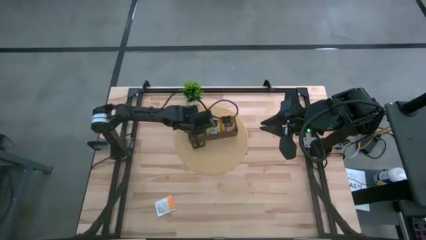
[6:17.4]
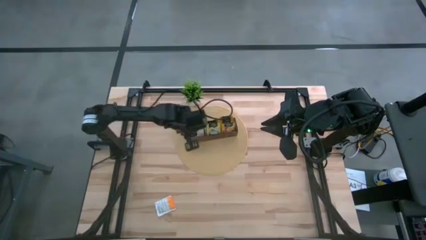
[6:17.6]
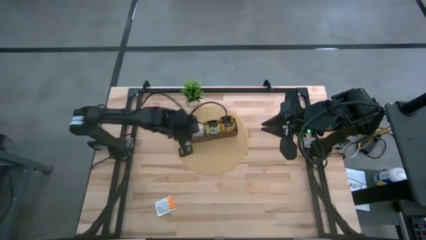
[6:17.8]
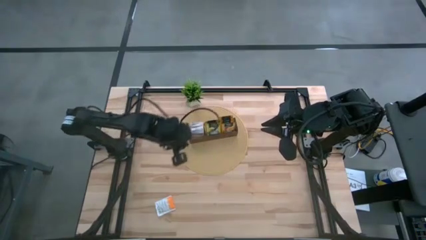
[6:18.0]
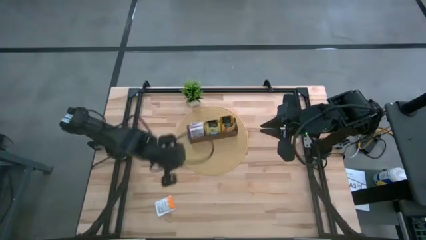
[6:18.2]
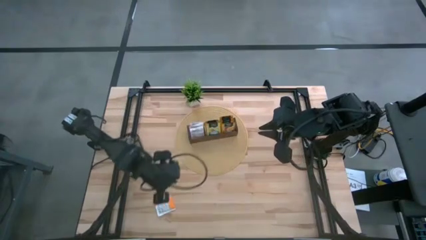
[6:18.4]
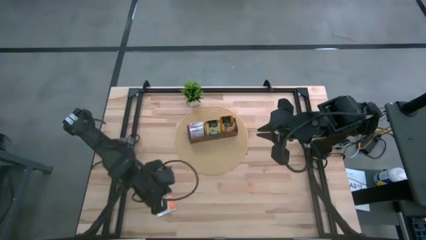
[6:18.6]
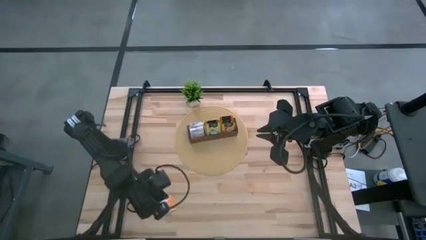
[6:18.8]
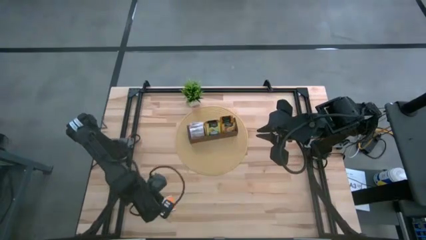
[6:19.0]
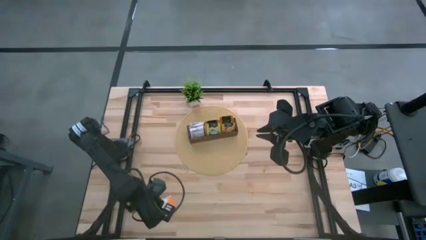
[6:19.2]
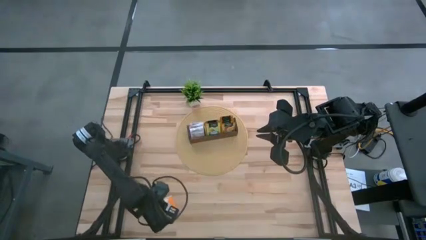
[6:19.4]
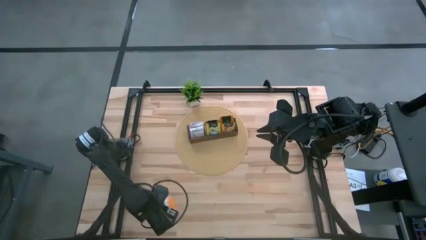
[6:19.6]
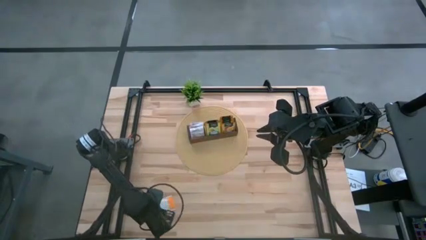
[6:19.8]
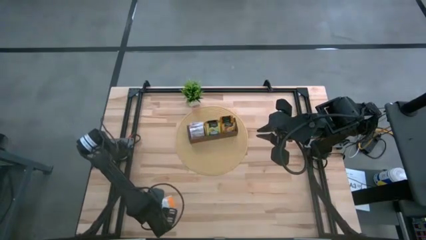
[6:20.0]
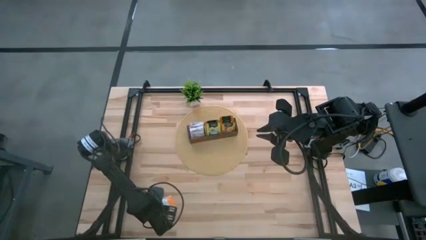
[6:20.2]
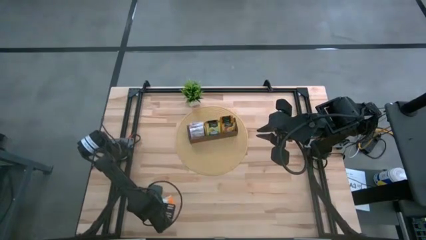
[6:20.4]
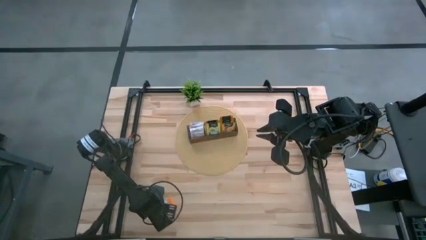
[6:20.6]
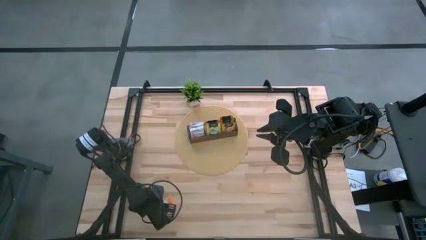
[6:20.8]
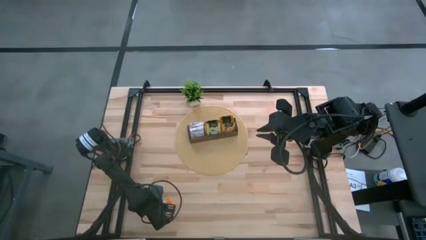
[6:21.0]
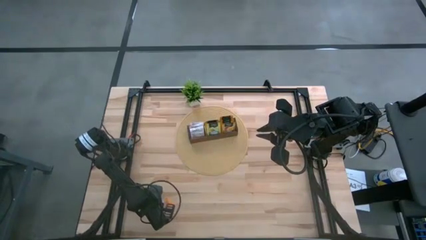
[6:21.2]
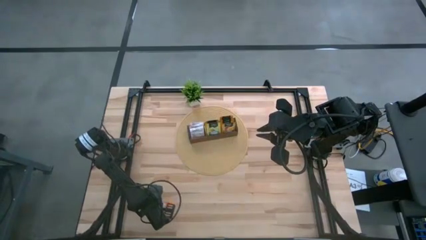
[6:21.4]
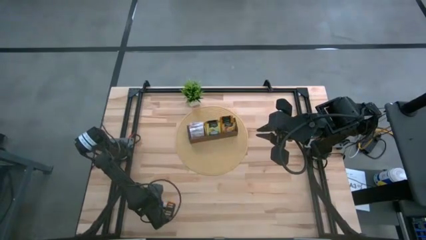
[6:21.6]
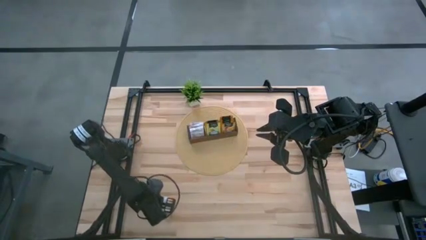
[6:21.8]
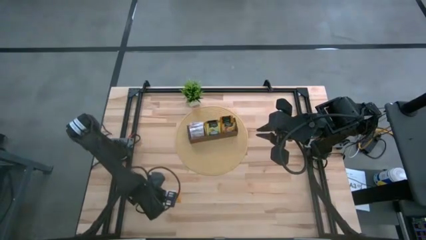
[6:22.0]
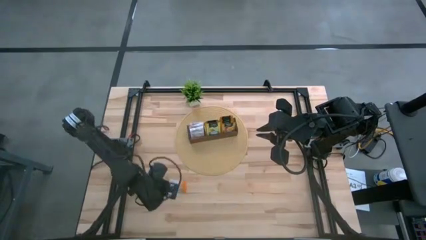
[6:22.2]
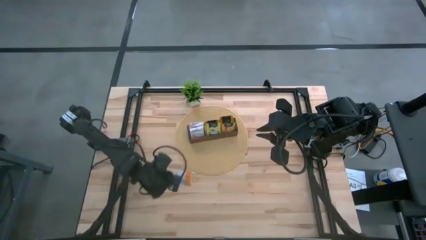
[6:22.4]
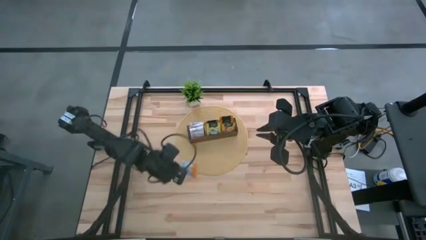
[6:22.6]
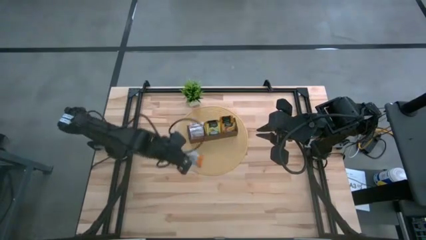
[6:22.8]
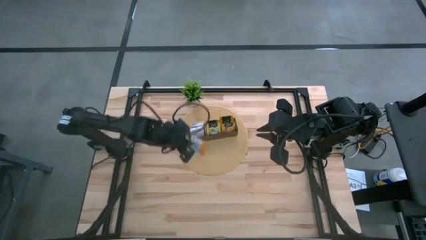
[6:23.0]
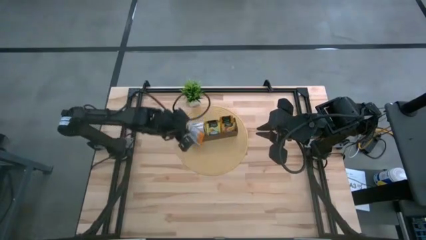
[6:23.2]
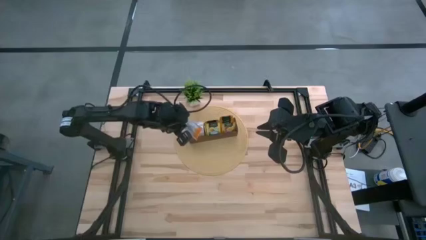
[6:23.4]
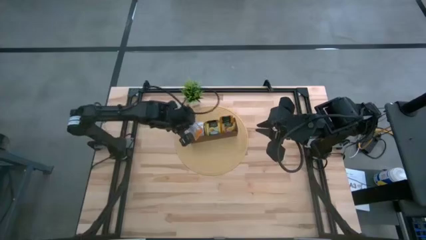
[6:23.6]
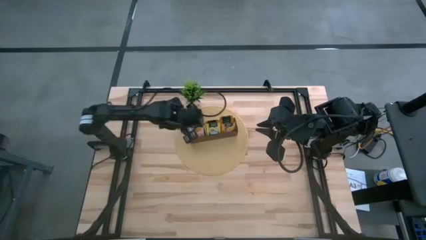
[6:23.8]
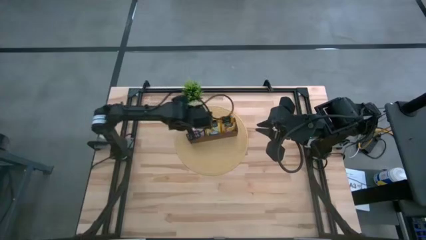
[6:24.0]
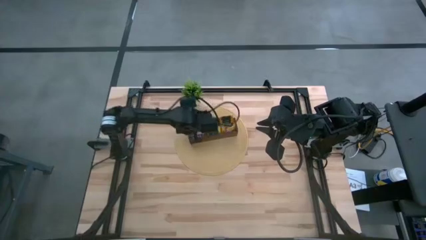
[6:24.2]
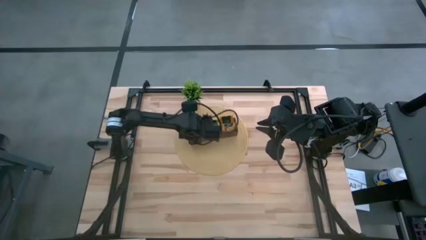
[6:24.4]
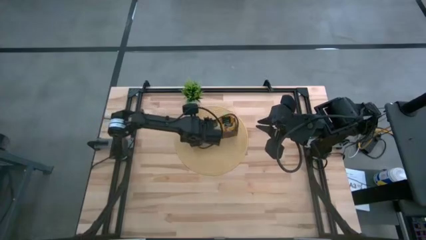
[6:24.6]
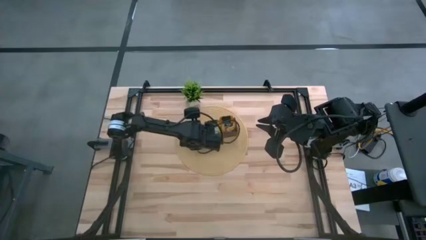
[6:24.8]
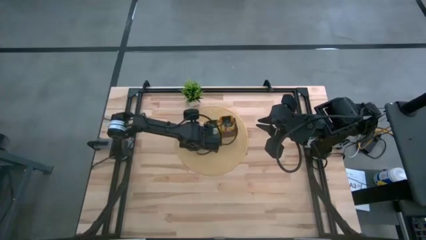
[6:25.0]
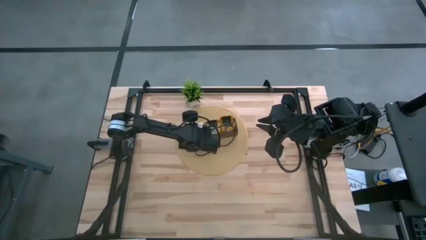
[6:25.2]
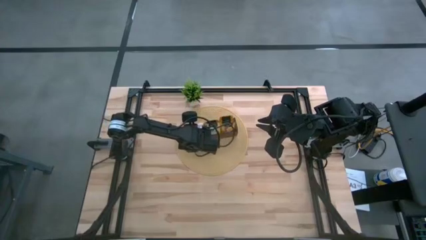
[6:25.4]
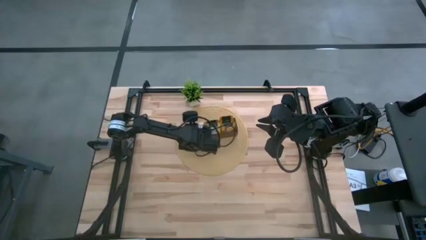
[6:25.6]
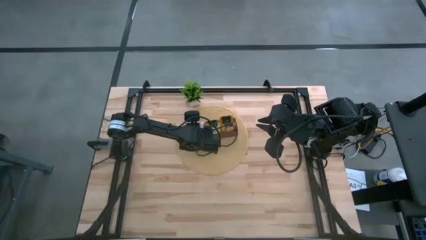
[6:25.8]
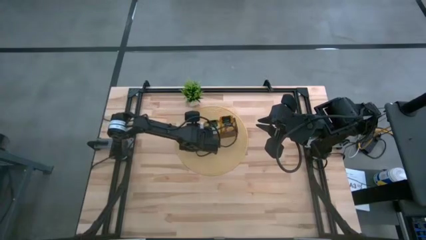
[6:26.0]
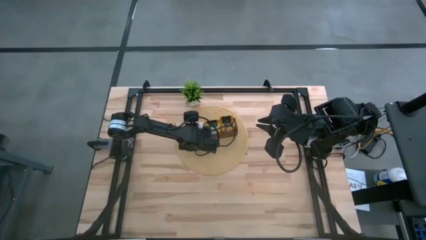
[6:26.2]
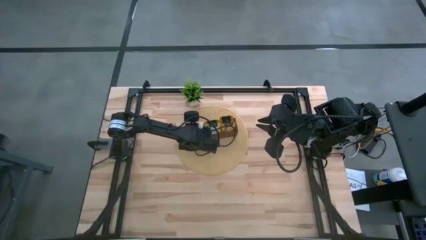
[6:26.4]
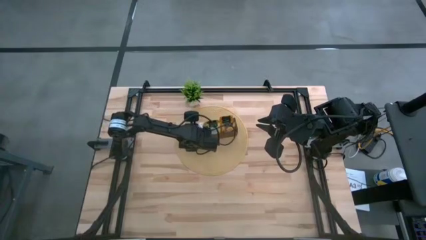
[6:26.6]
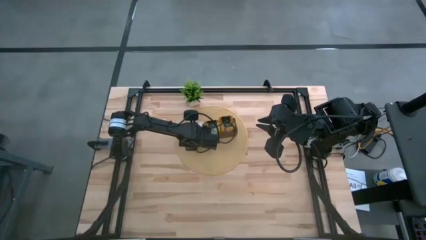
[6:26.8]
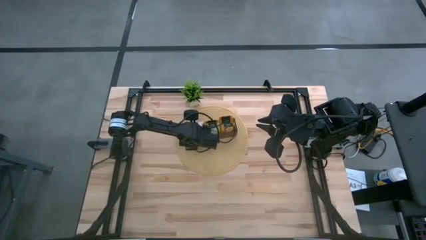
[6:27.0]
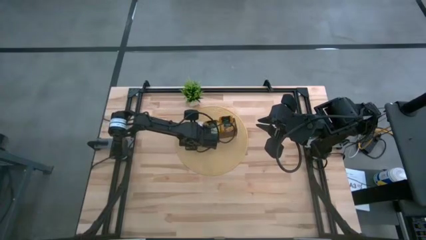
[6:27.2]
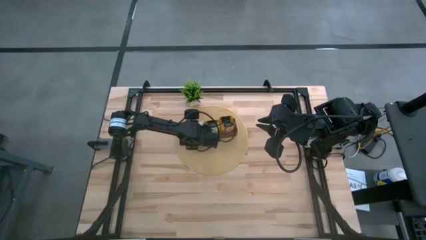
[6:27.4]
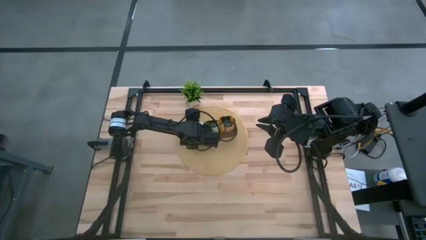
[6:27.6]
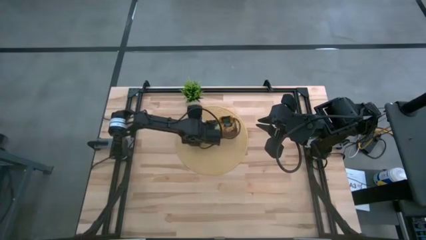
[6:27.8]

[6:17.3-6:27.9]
Task: Pick & Place Tea
Put the white tea bag into the left section of the wooden organizer

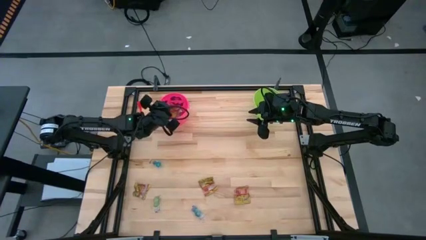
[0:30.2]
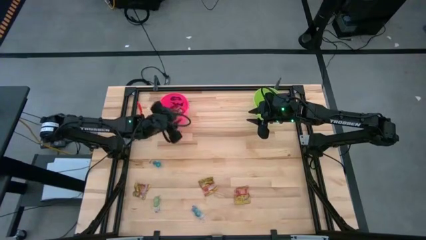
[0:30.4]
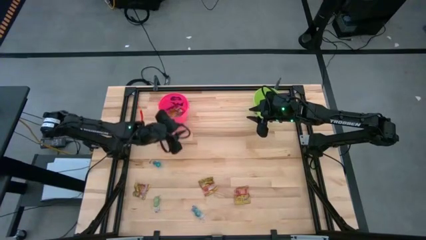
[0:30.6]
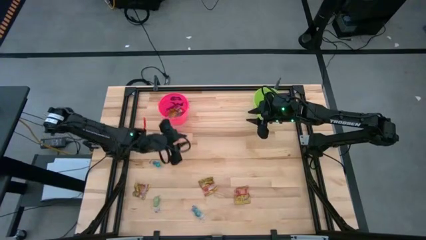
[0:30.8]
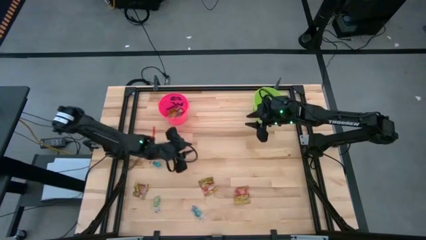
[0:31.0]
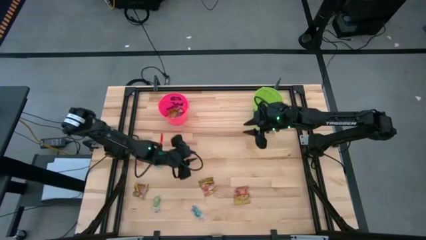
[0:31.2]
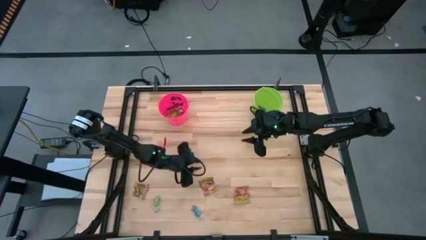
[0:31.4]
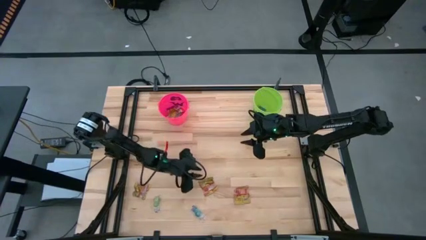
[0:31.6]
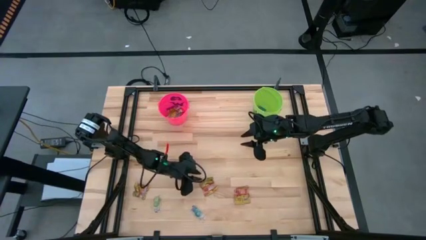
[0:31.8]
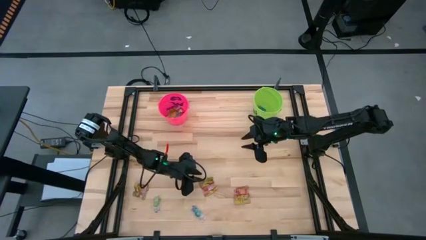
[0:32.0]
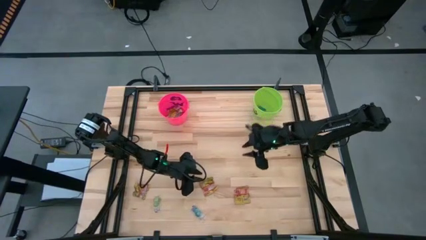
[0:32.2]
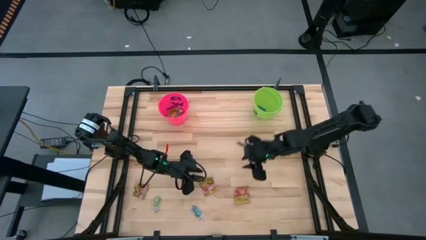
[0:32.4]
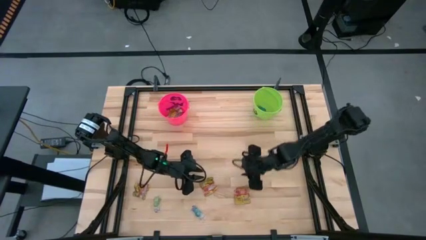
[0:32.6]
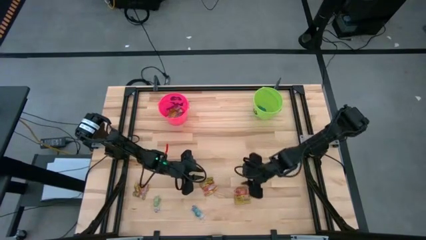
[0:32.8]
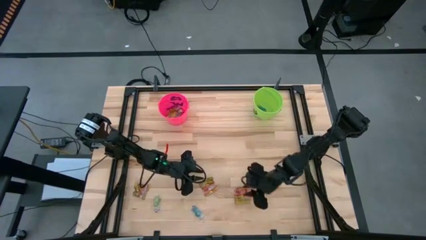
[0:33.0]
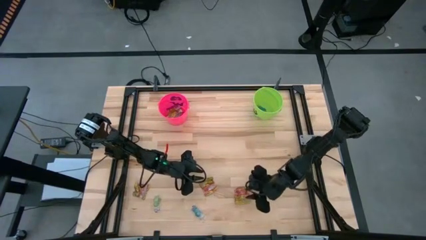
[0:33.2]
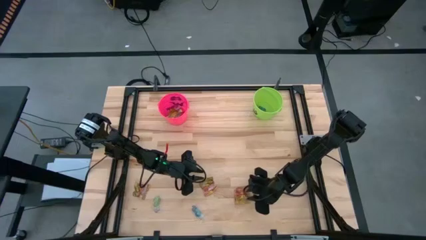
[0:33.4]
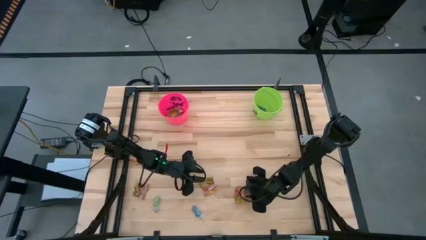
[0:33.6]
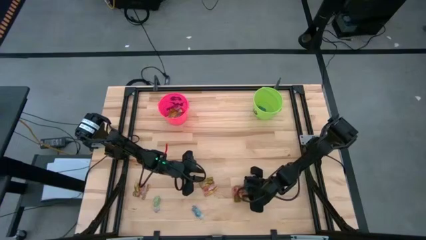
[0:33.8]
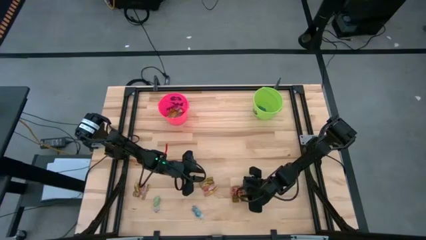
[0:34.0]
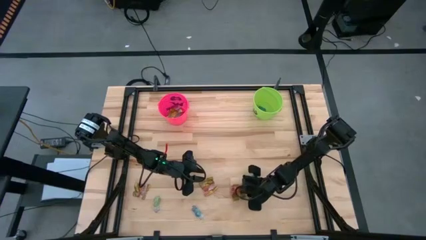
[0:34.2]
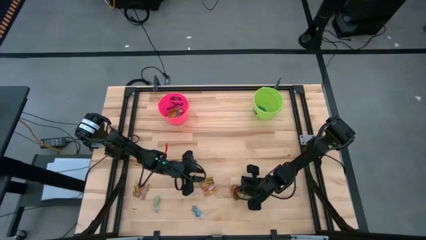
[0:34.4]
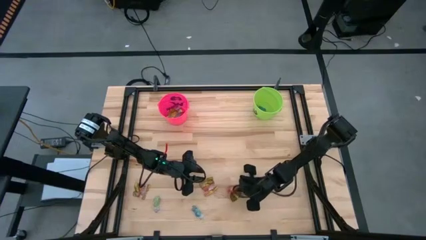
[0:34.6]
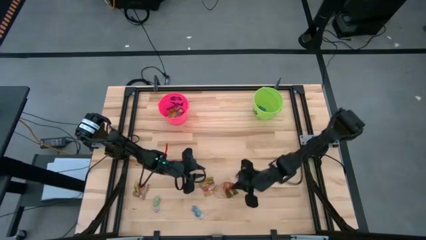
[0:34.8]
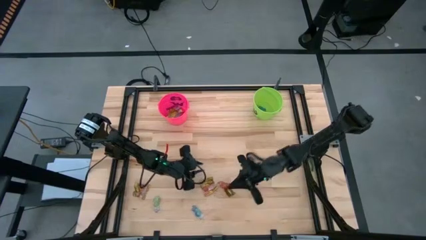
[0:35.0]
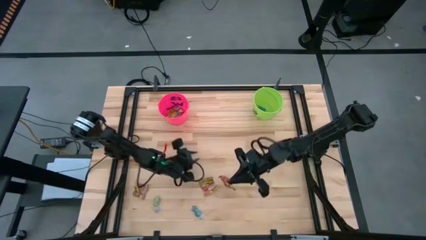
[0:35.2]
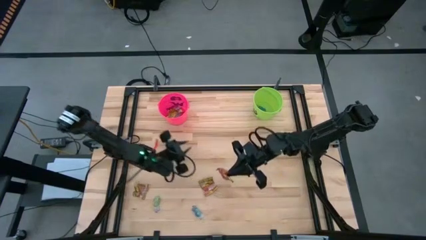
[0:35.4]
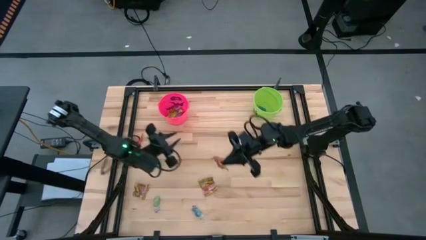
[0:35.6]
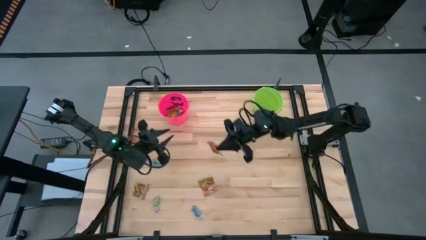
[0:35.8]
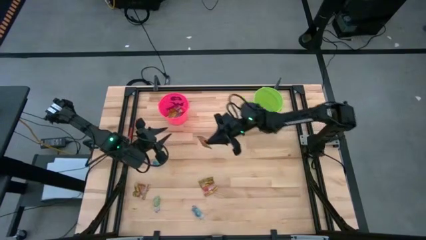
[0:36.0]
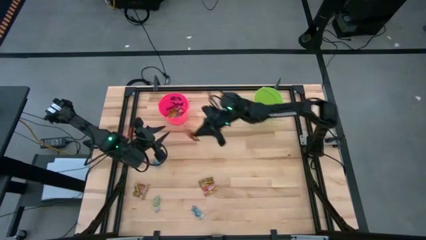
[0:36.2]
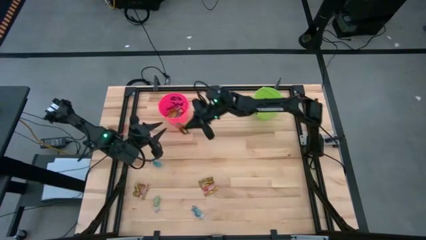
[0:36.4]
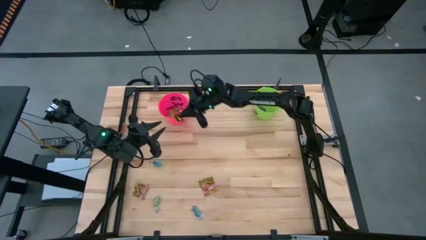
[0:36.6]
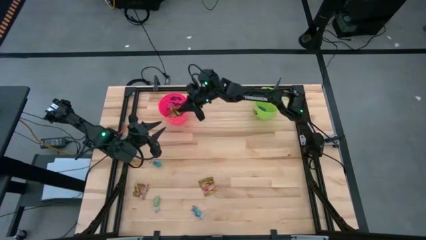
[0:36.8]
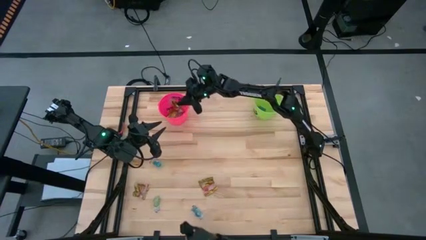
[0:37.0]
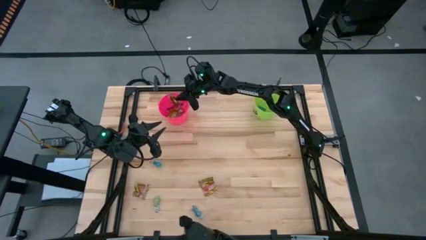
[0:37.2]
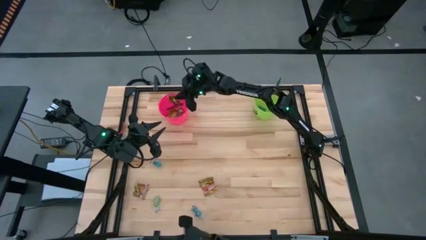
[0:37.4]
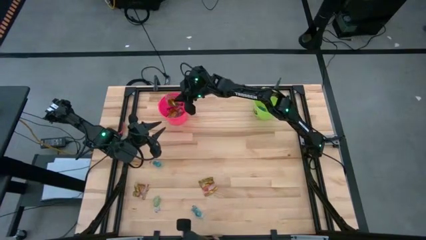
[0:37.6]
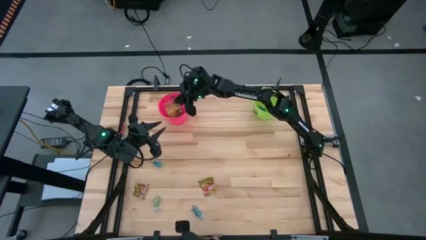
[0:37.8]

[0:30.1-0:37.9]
Task: Sort candy by brand, put in halloween buckets
Put the gold red candy into the pink bucket
